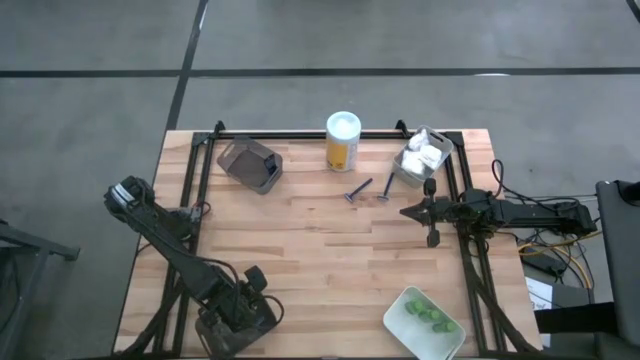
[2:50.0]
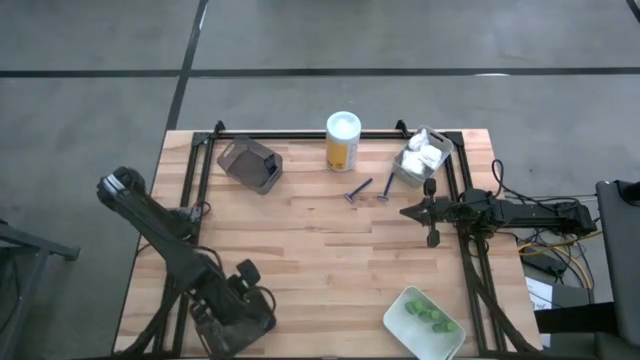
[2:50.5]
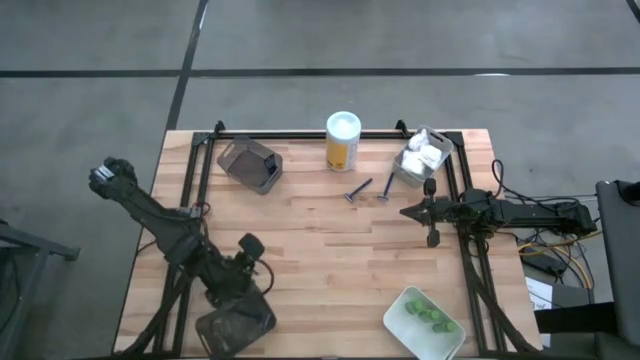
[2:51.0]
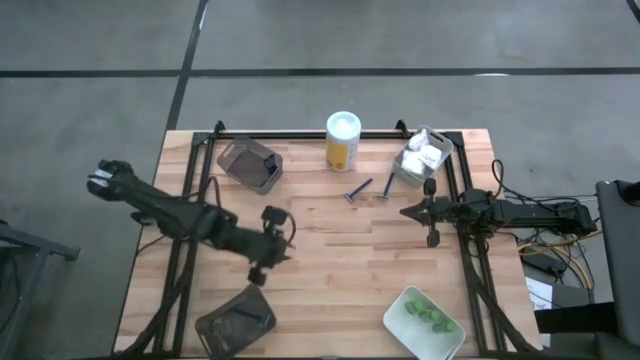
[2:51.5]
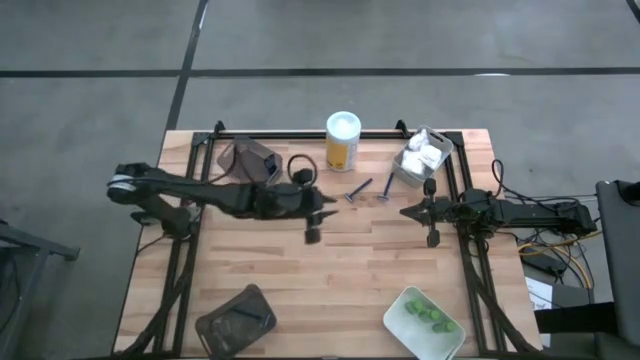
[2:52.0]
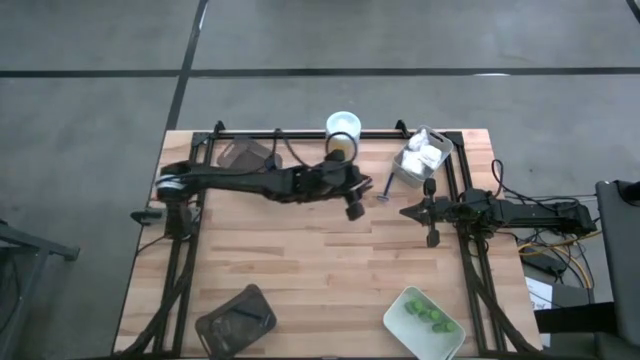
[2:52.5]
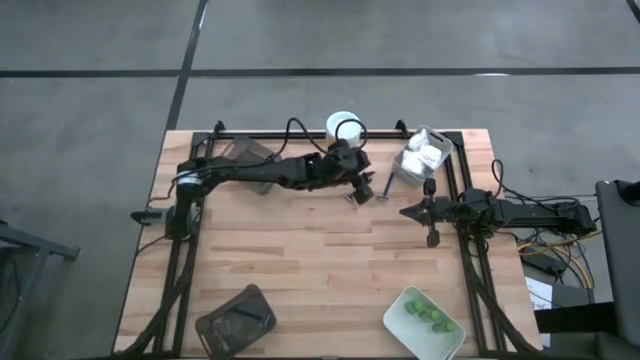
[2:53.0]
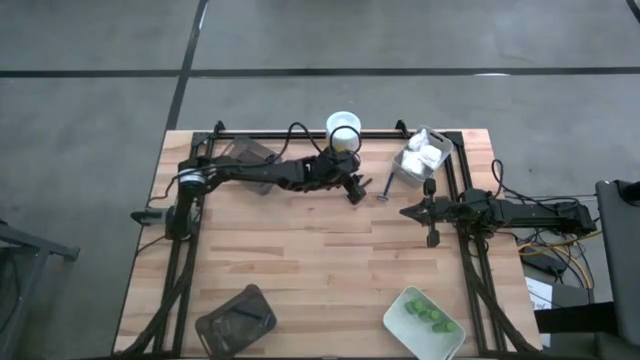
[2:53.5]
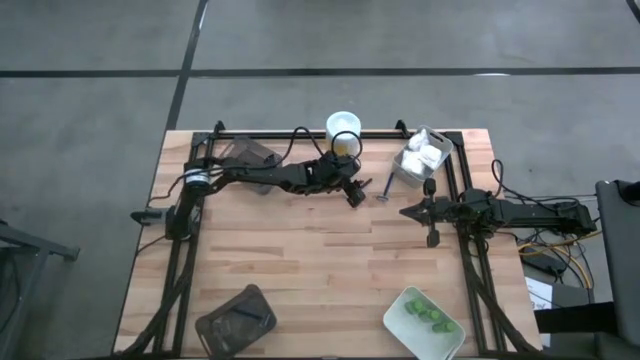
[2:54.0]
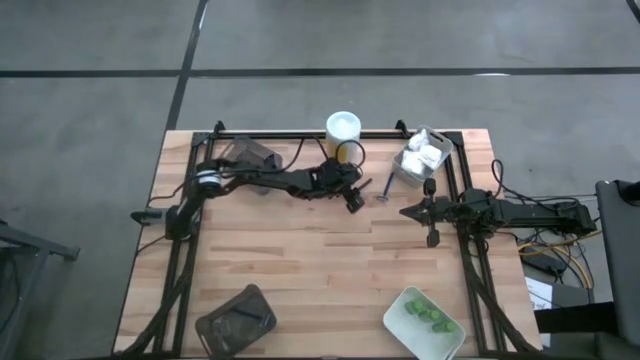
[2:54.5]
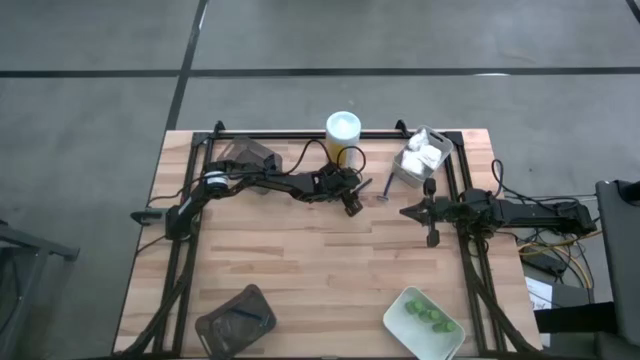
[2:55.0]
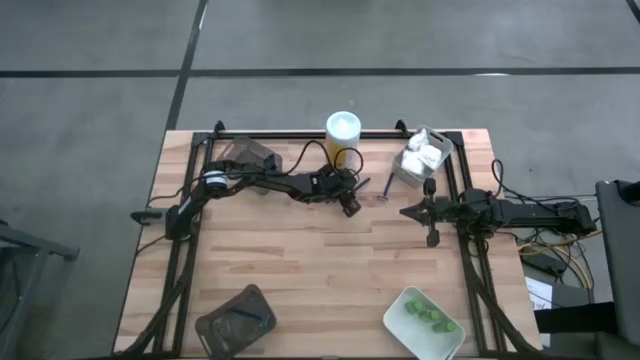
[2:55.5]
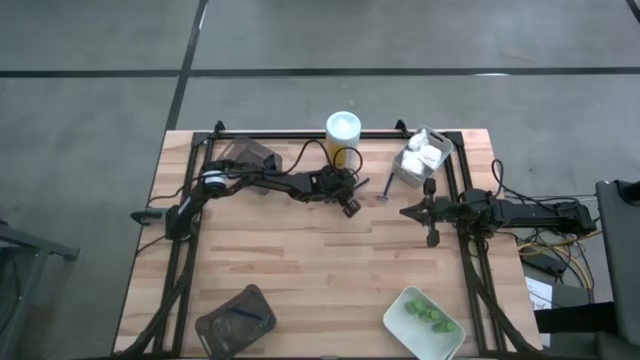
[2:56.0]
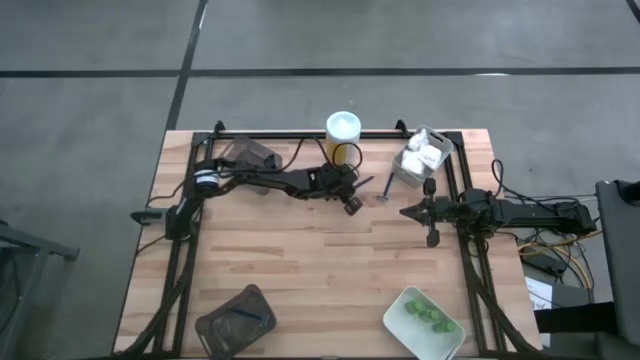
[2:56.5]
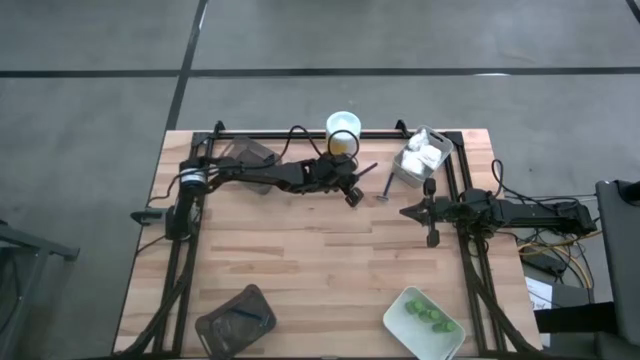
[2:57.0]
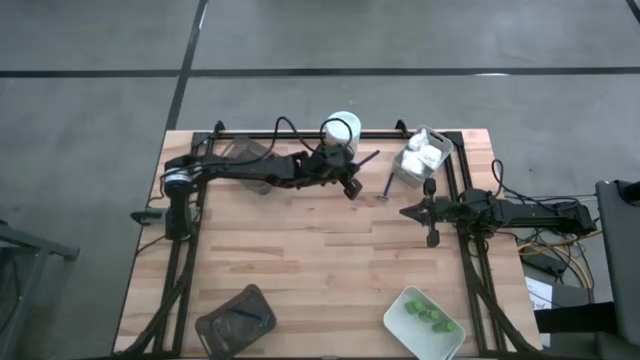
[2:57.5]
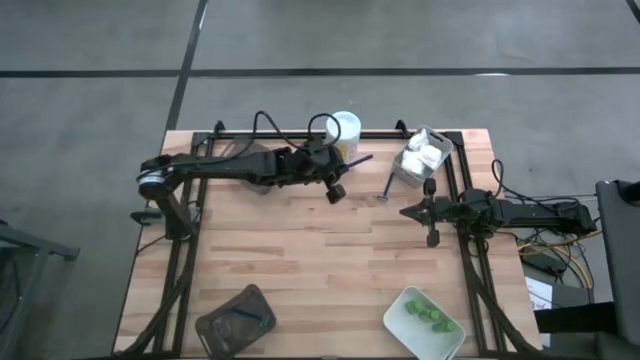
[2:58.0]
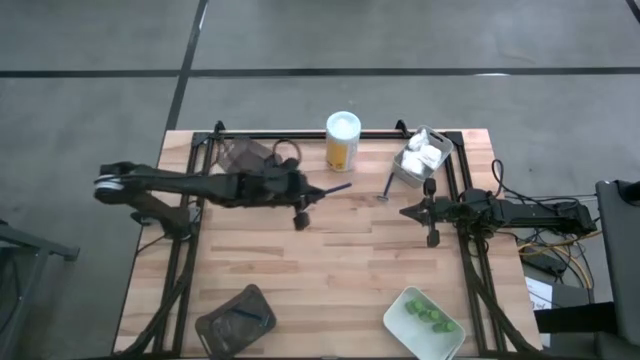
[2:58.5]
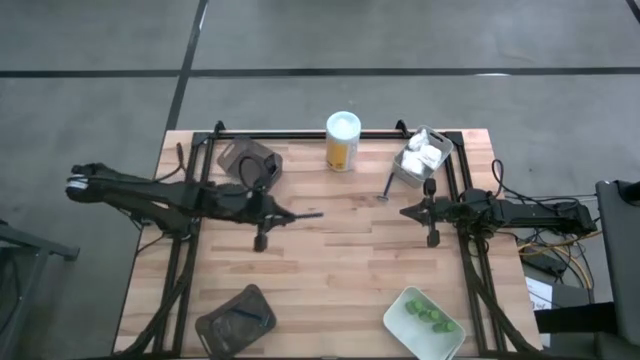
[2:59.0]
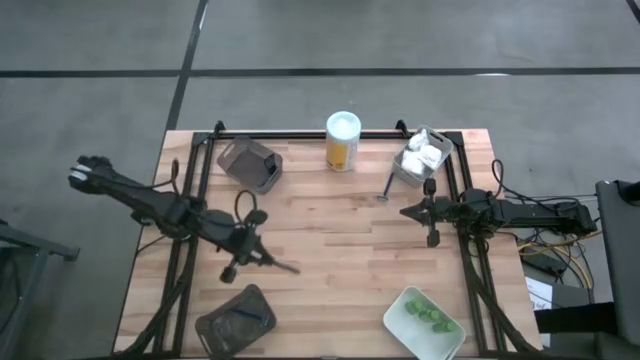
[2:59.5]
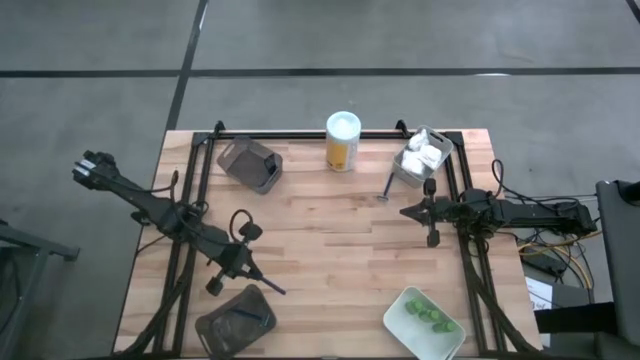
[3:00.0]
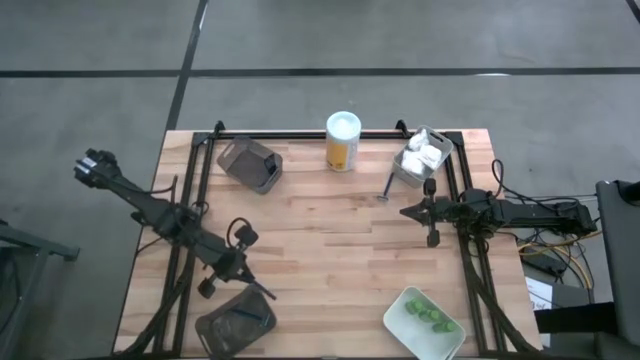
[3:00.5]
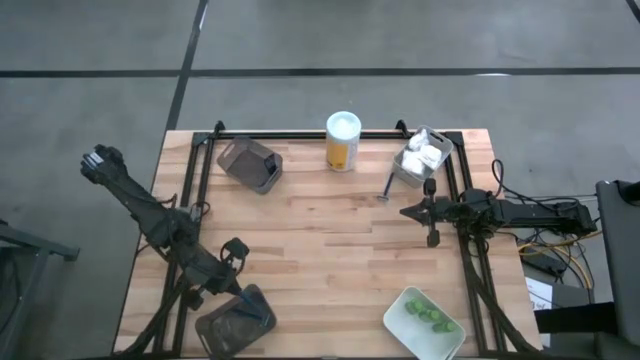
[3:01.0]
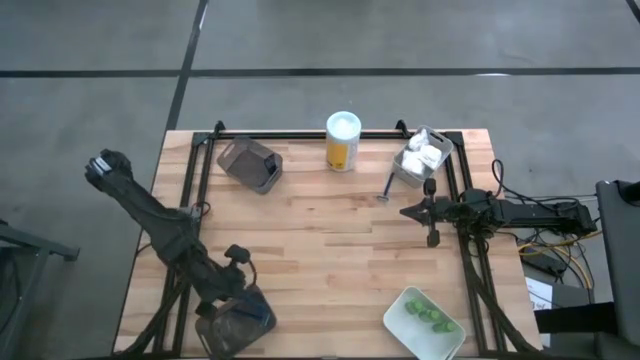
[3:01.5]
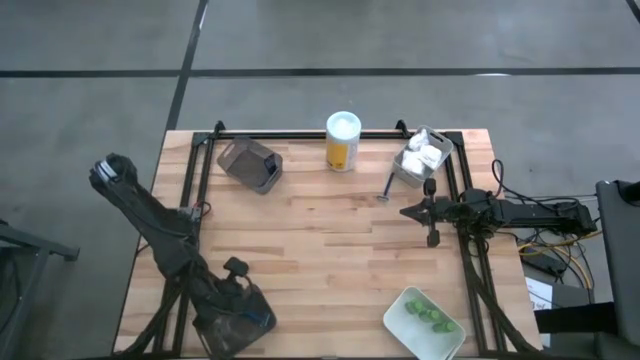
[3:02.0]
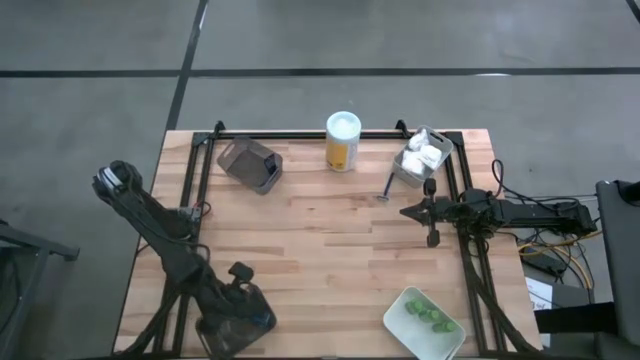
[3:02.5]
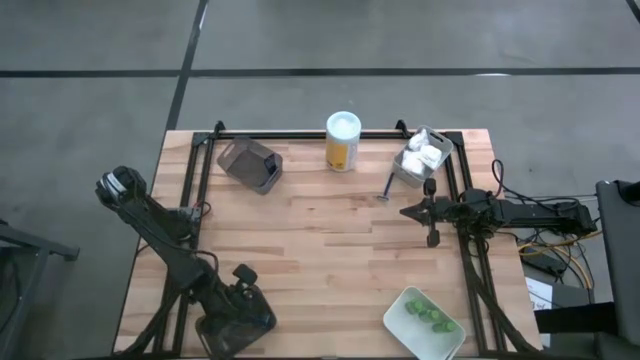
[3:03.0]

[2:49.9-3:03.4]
Task: Pick & Place Travel size toiletries
Put the blue razor into the bottom black bin

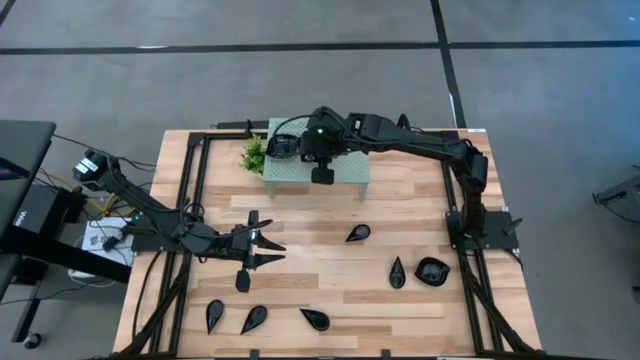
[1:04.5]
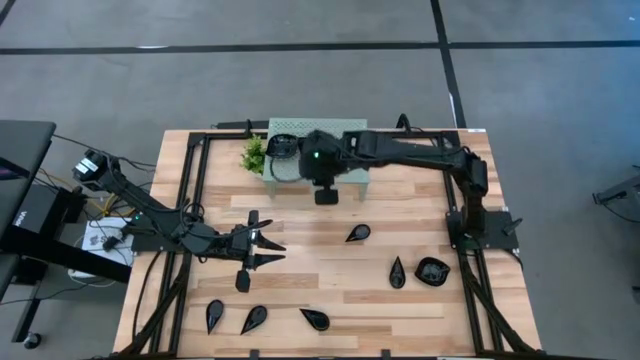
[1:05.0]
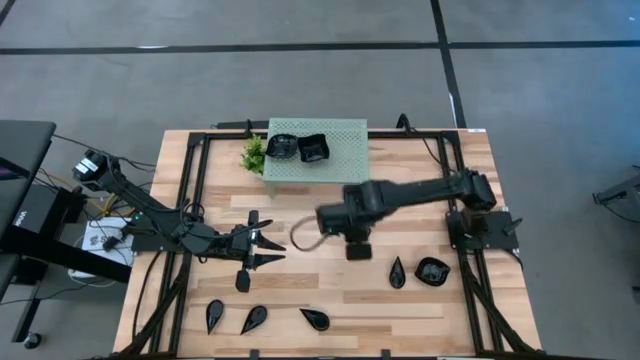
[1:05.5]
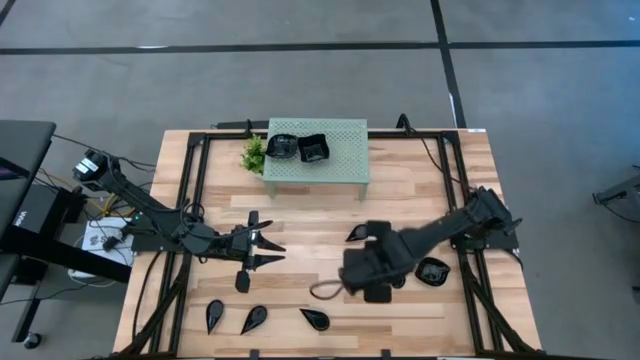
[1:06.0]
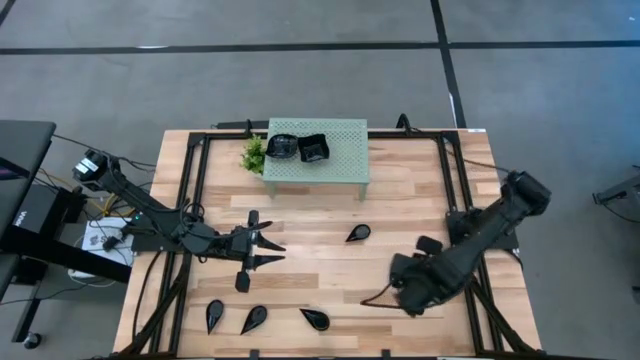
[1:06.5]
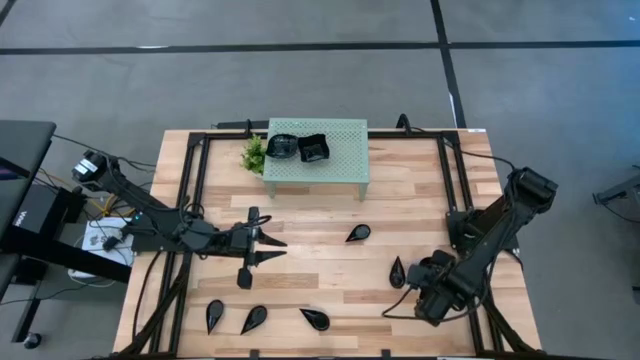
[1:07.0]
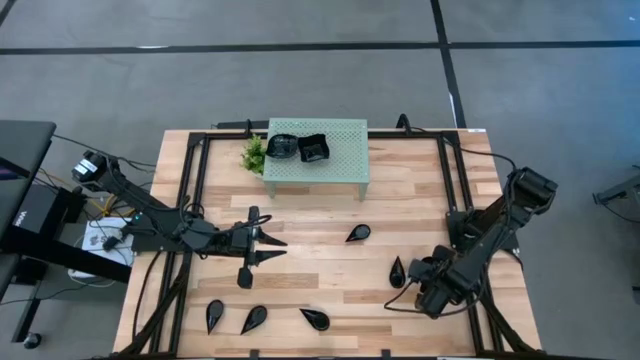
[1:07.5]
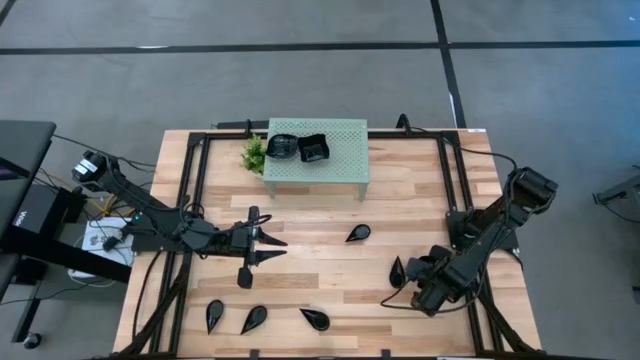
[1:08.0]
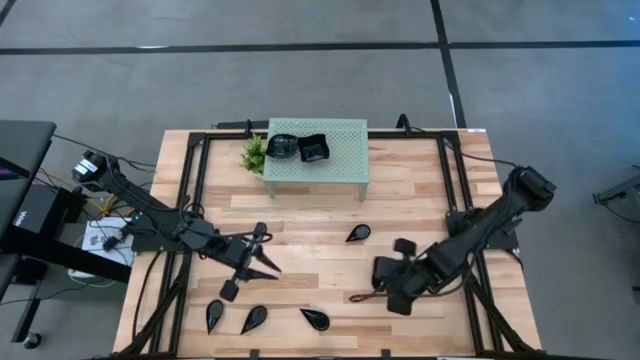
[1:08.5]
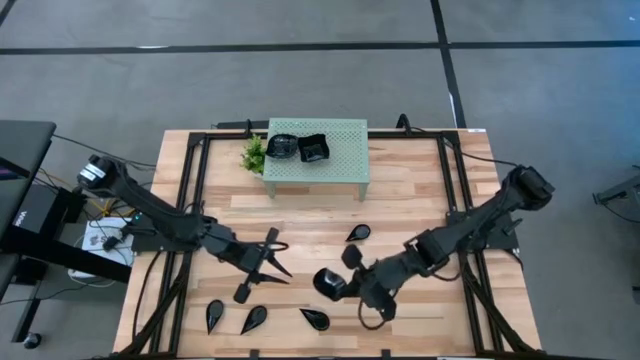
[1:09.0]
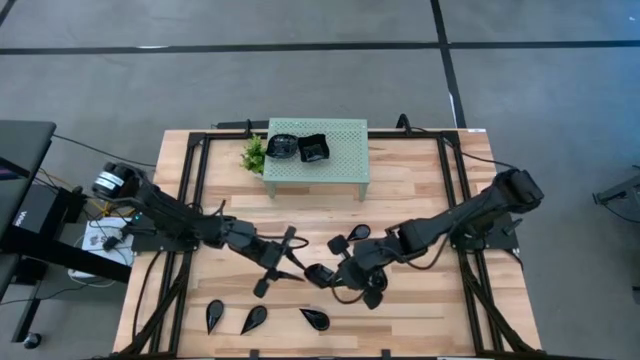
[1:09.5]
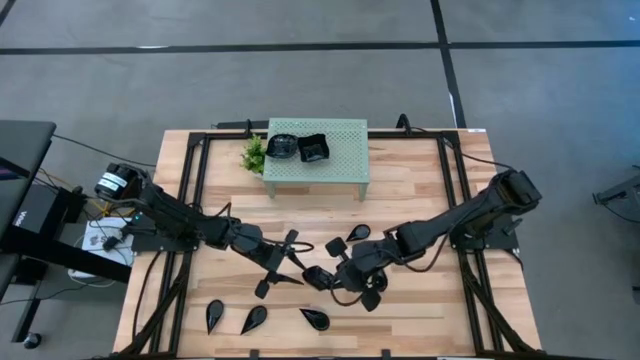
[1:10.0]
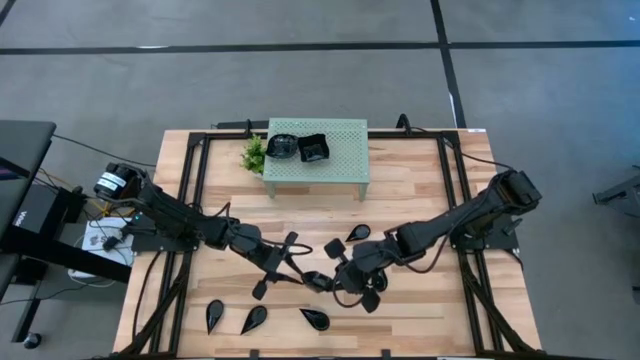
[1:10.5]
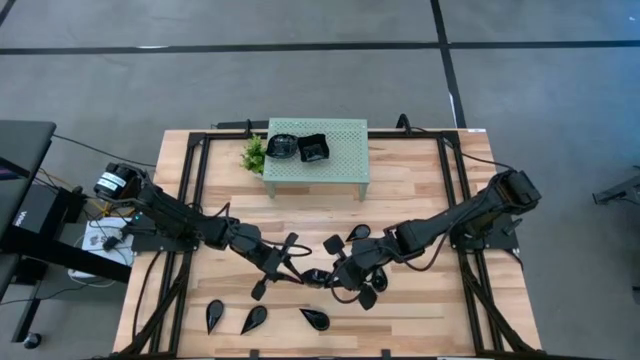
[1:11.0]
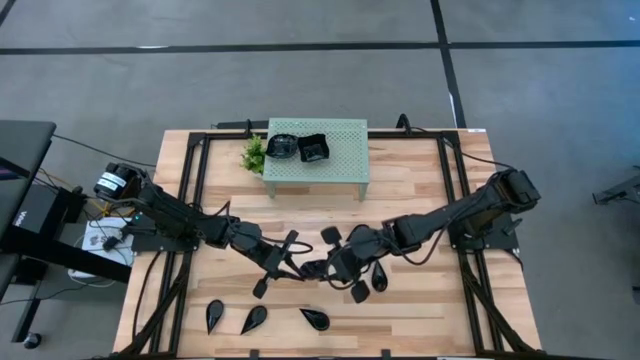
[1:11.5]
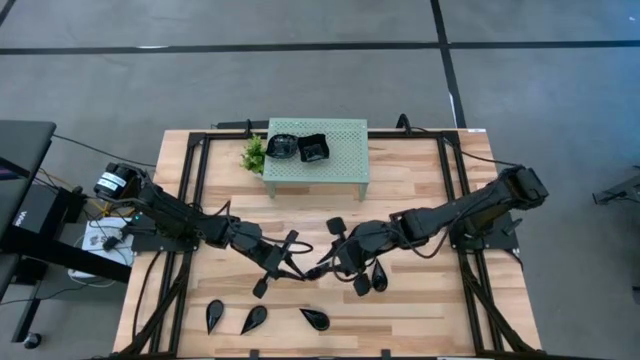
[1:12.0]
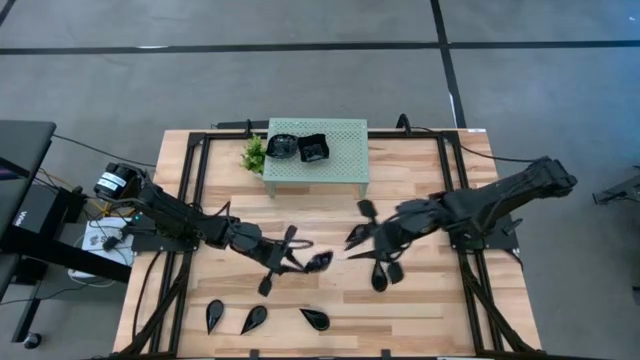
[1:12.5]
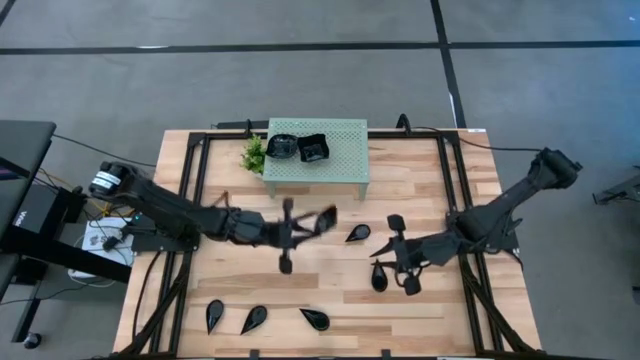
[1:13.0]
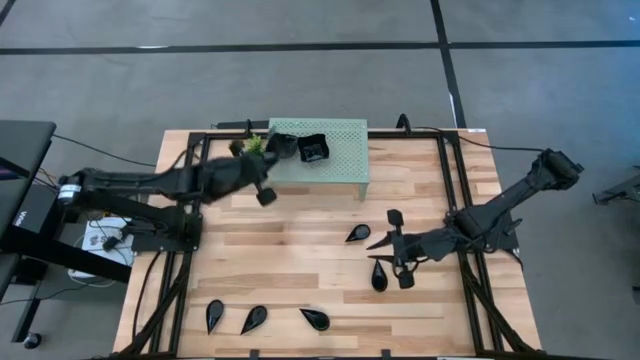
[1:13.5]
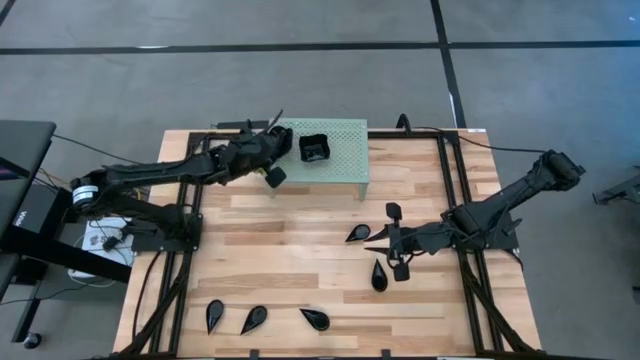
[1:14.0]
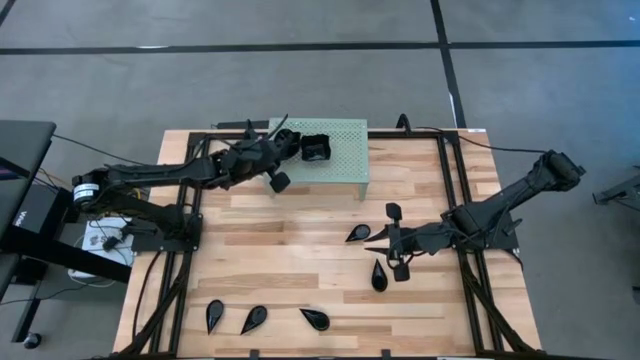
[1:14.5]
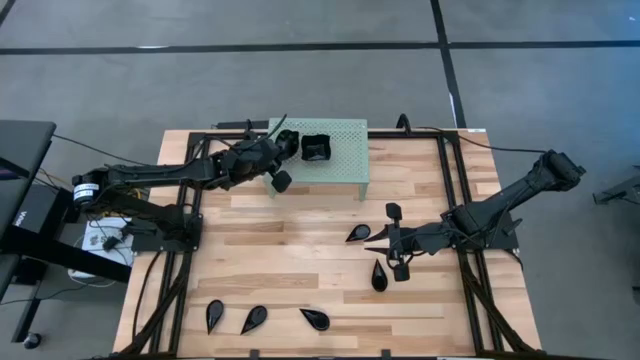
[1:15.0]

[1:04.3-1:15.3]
Task: Pick & Place Mini shaped plates
Stack the leaf-shaped plate on top of the other leaf-shaped plates on the shelf
